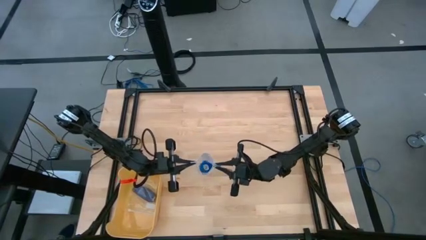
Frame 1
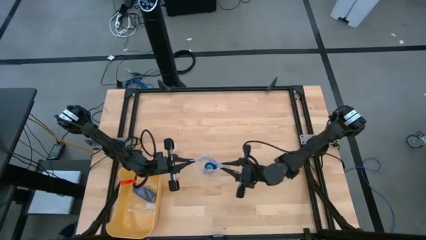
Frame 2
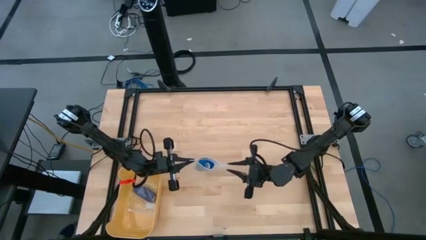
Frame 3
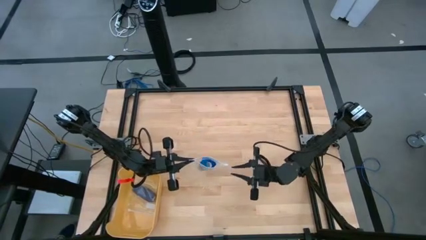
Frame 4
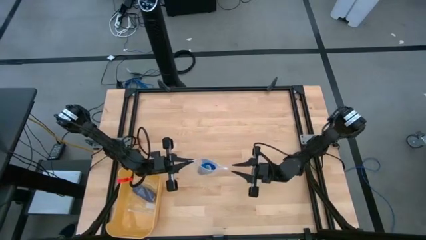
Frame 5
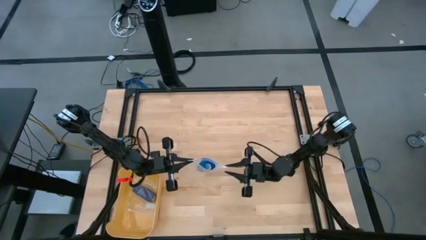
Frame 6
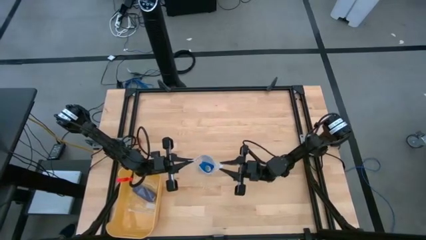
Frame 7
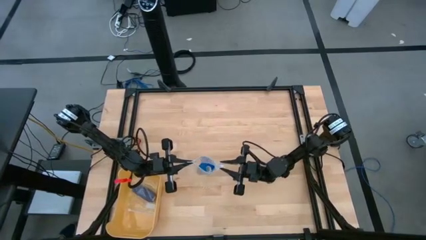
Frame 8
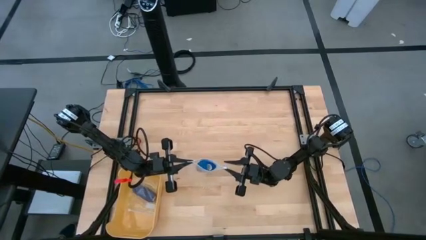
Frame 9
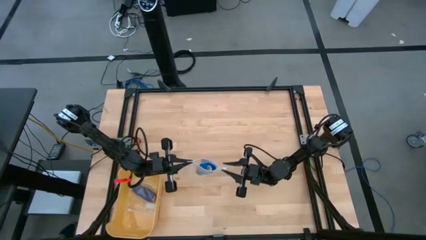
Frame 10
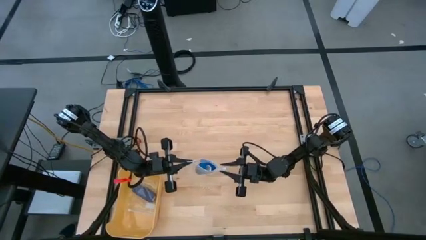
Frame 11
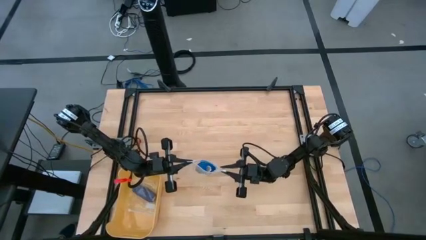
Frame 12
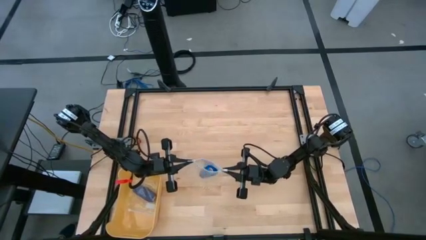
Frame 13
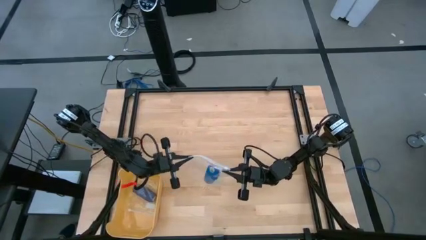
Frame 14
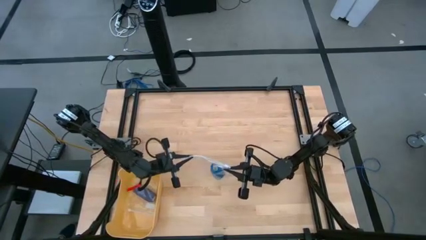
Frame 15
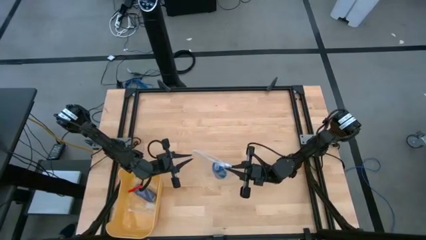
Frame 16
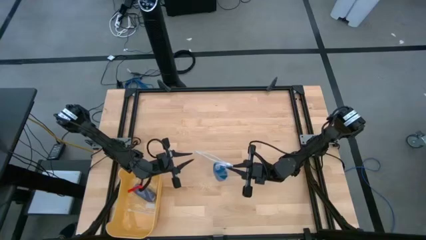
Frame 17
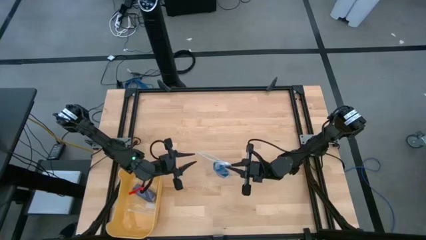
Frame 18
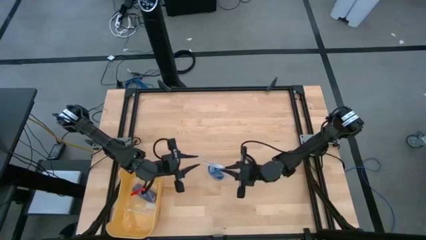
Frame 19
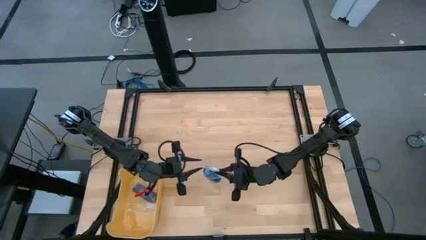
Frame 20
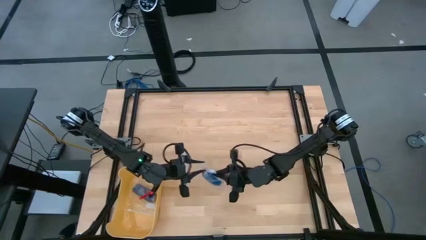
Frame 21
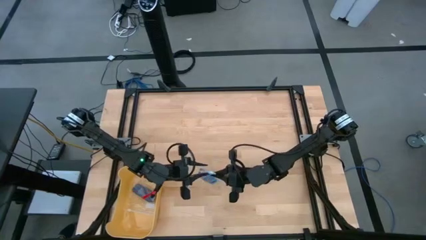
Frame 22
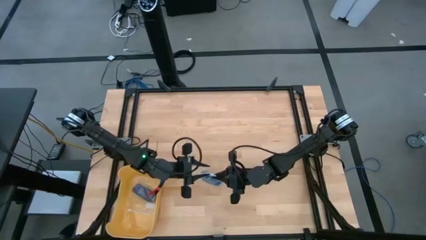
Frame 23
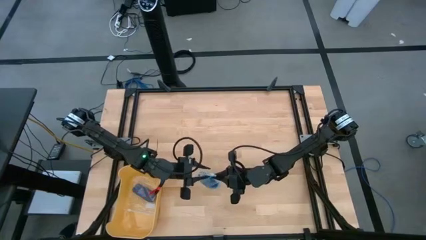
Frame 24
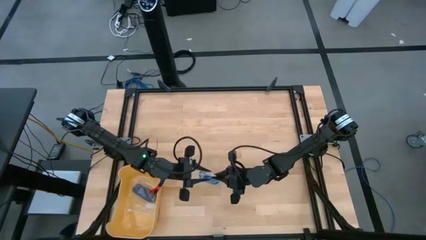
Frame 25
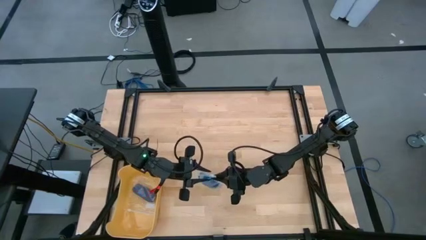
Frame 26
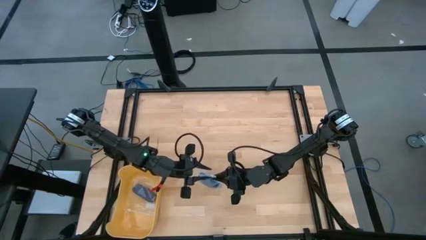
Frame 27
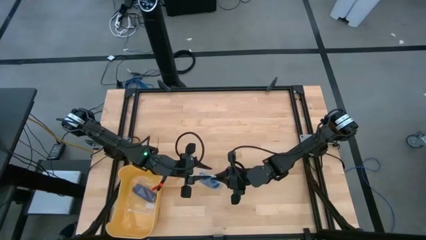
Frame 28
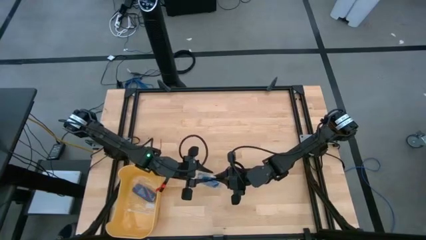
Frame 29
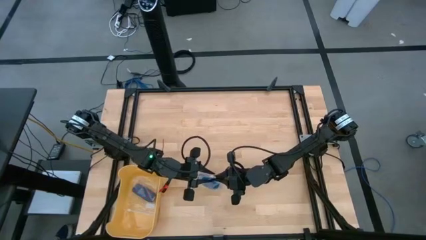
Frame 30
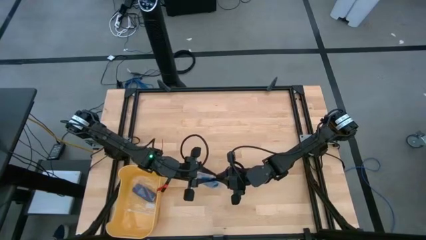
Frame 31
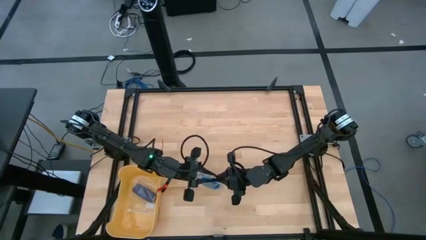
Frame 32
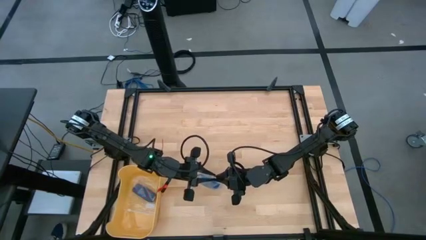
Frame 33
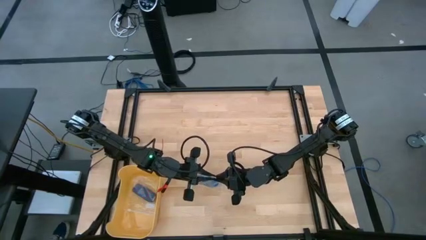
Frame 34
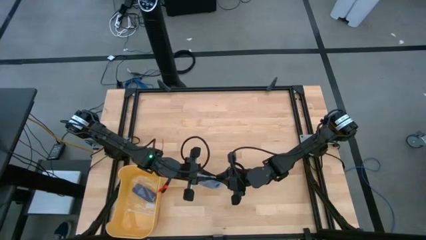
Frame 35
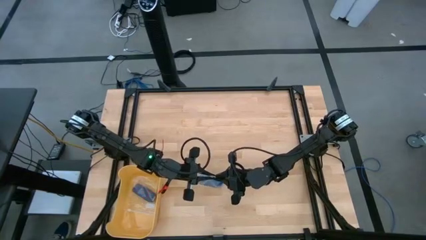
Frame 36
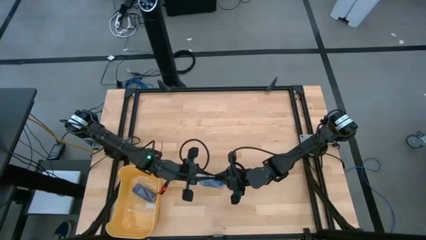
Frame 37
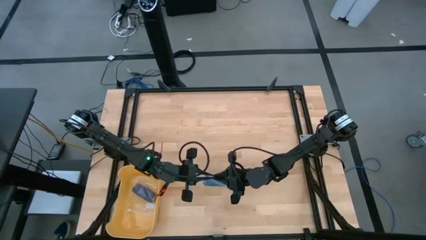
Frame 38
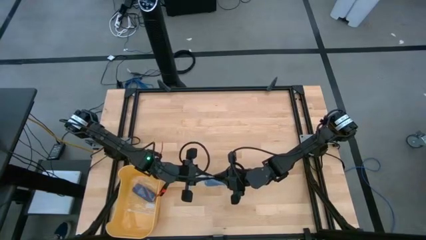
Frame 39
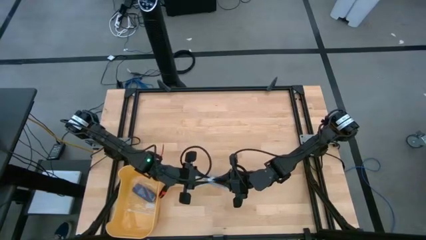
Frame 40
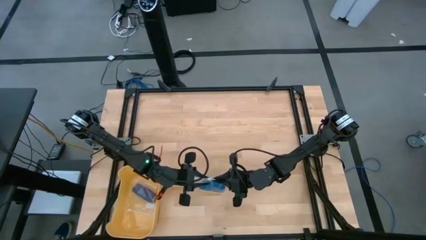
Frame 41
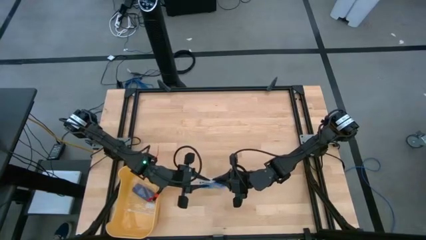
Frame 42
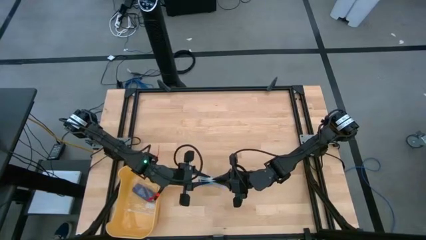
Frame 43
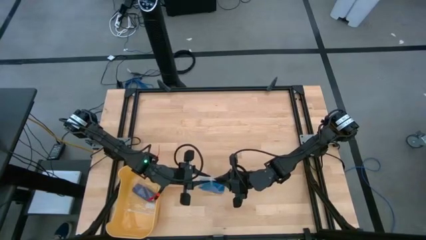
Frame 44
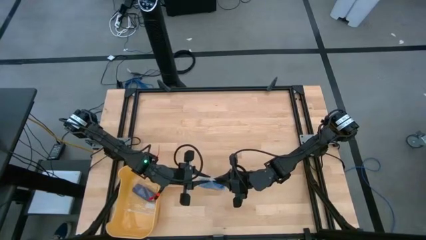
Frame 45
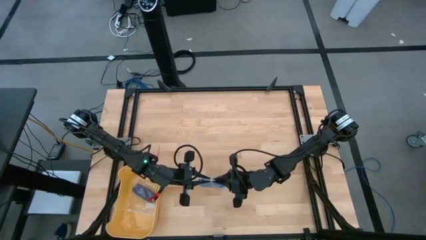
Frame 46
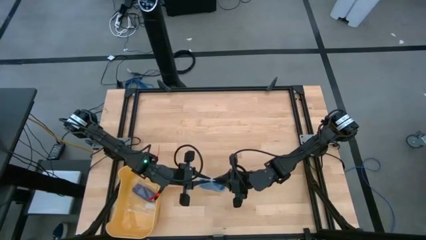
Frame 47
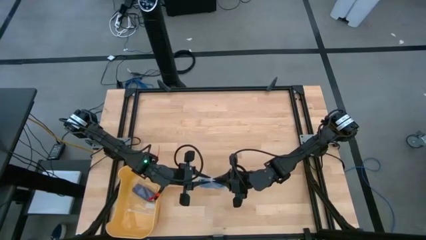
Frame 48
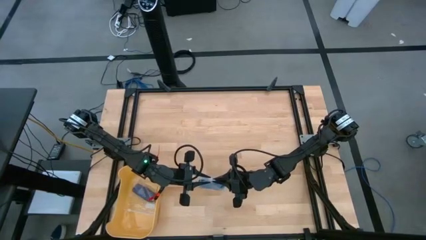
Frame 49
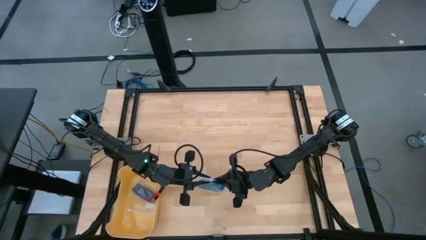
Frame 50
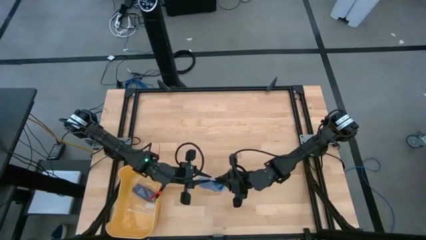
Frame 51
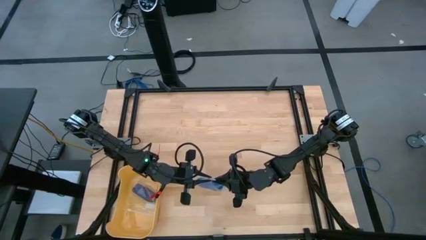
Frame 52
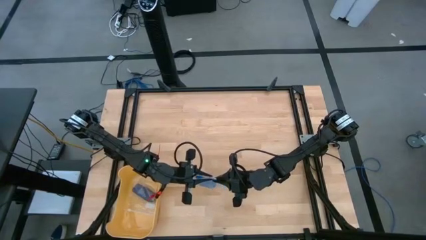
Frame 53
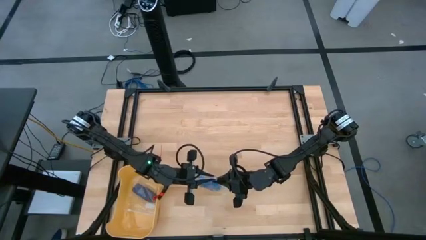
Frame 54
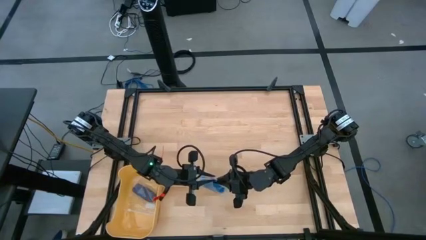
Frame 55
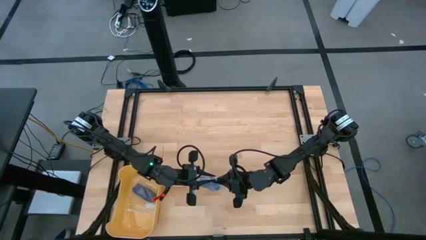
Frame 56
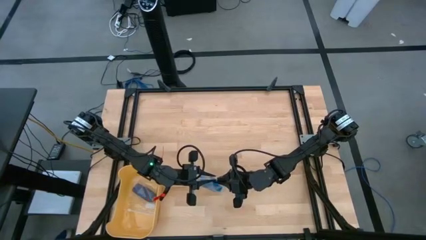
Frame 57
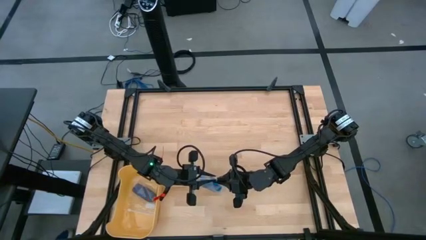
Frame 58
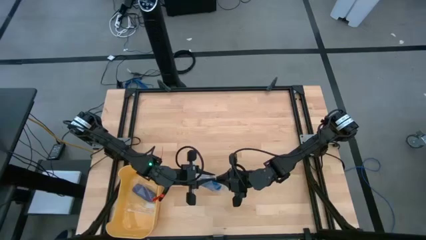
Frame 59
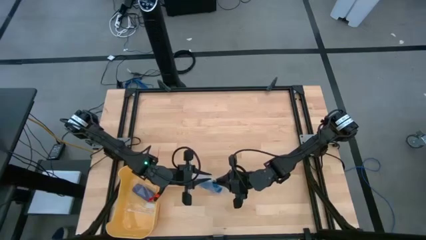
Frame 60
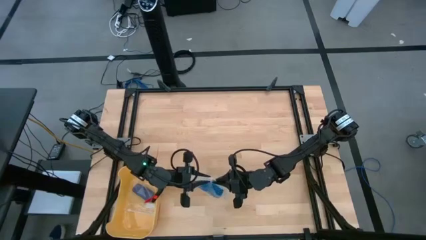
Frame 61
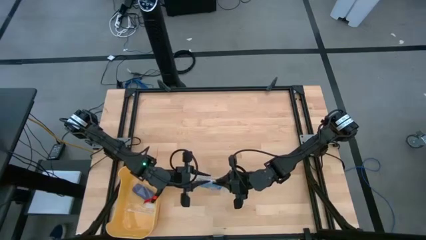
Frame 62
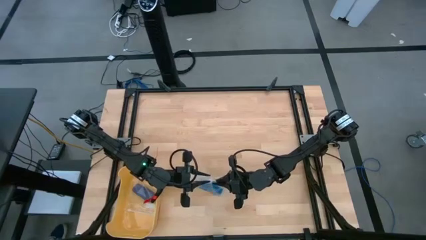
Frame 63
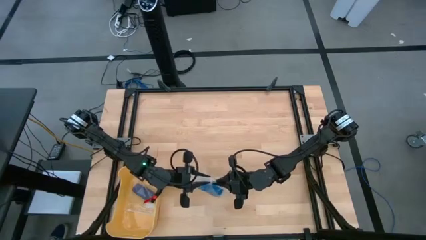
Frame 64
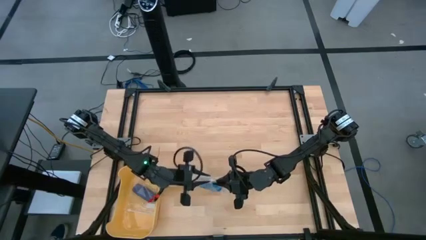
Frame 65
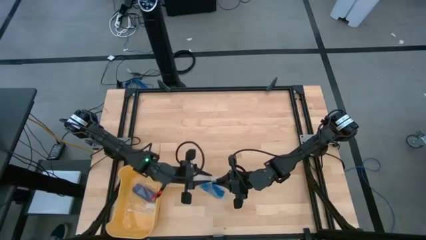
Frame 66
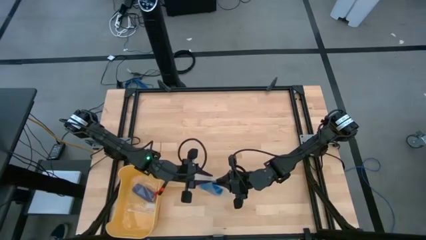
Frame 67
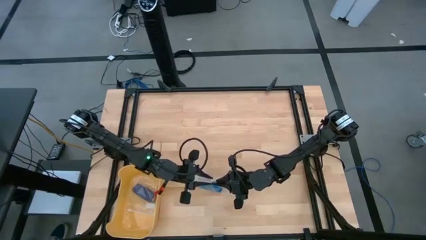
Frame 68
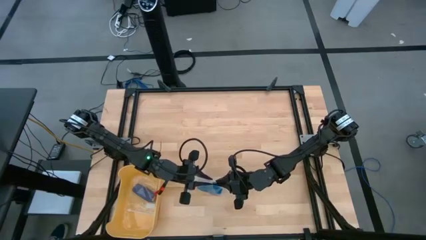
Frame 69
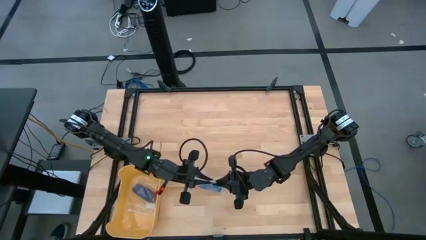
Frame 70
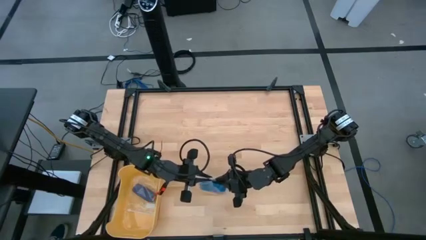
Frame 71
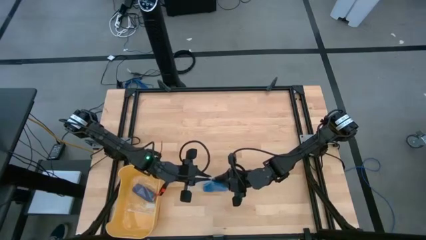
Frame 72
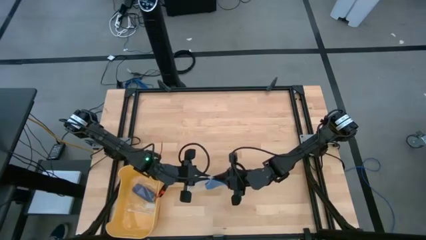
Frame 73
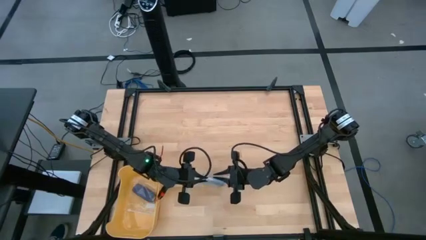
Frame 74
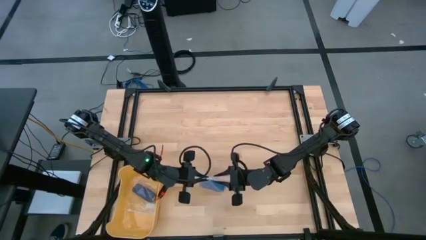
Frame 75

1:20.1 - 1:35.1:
Task: Roll bandage
Close the transparent zip bag

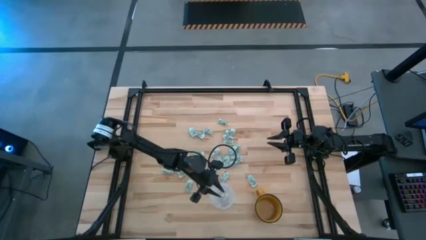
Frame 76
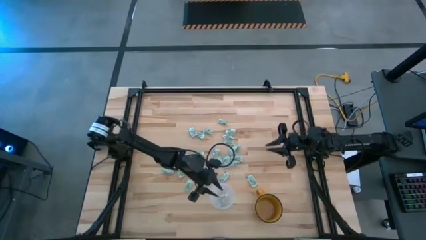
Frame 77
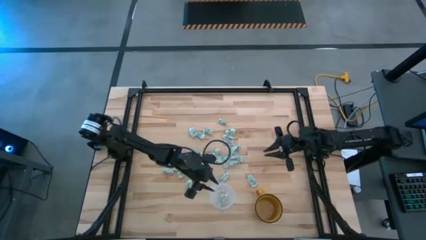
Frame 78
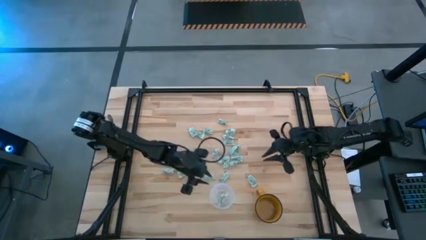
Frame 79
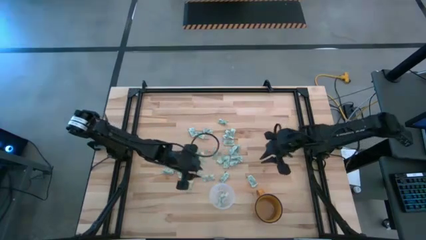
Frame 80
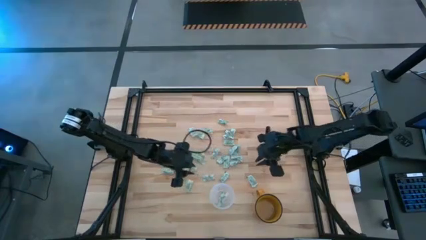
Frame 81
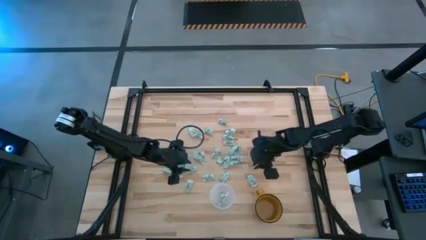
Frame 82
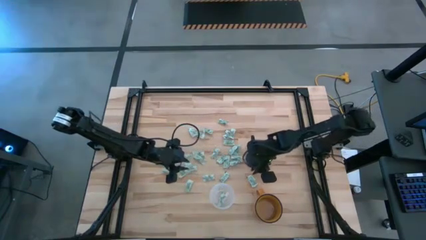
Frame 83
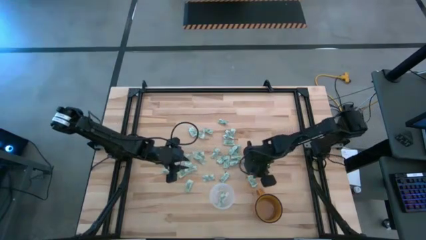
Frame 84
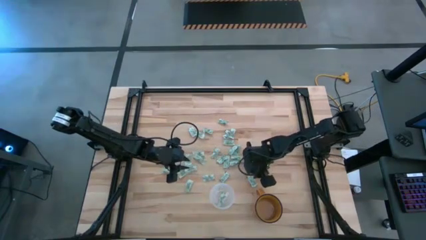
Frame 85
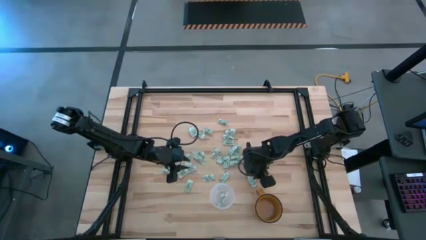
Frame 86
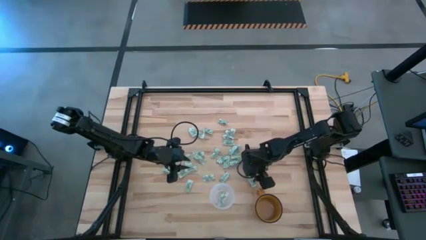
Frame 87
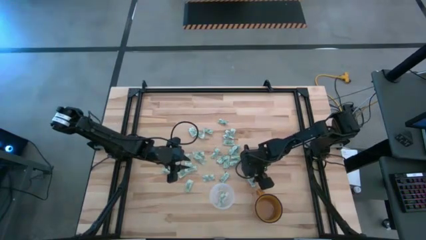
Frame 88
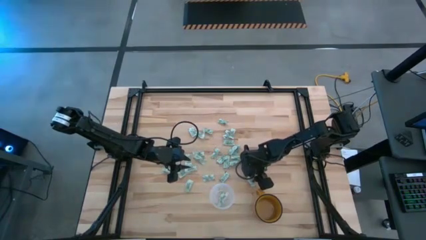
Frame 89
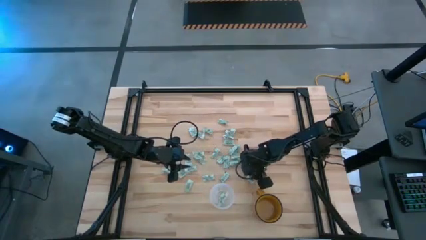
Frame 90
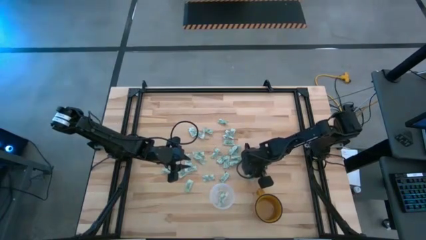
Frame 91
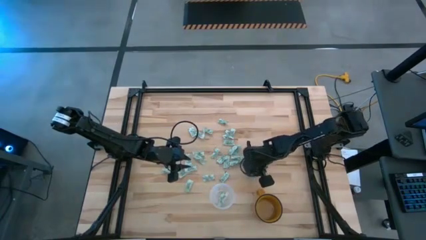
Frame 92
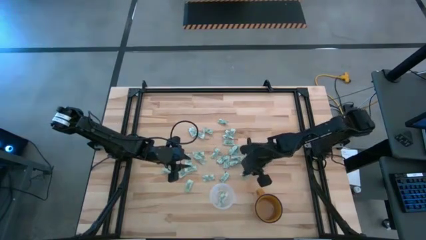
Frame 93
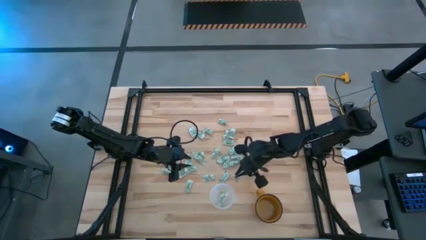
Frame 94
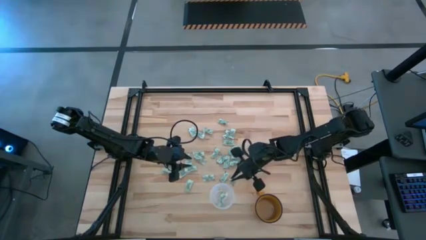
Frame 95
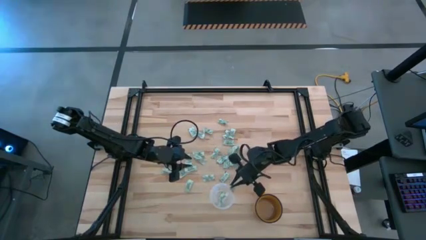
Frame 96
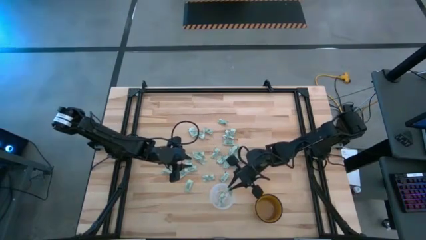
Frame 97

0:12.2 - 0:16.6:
Task: Pick and place Stevia / Truvia into bins
Put the stevia packet into the transparent bin
